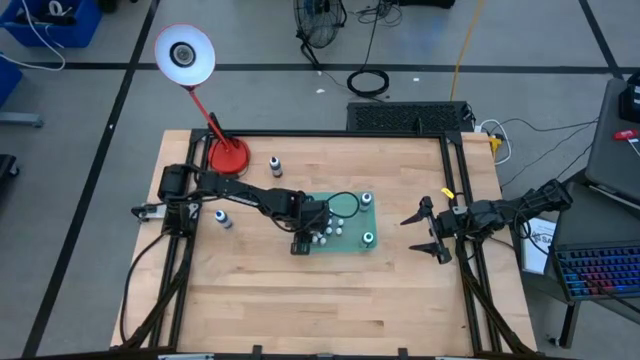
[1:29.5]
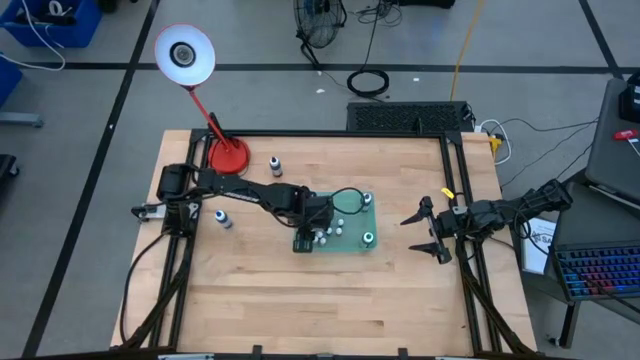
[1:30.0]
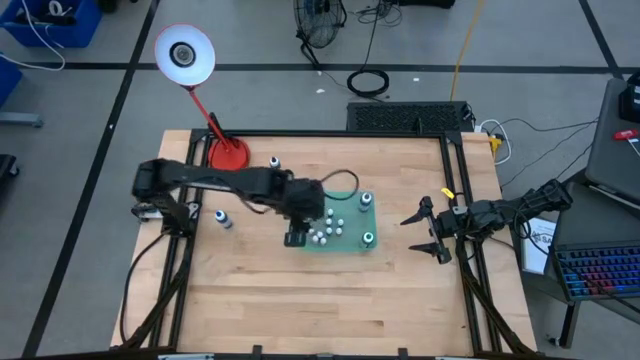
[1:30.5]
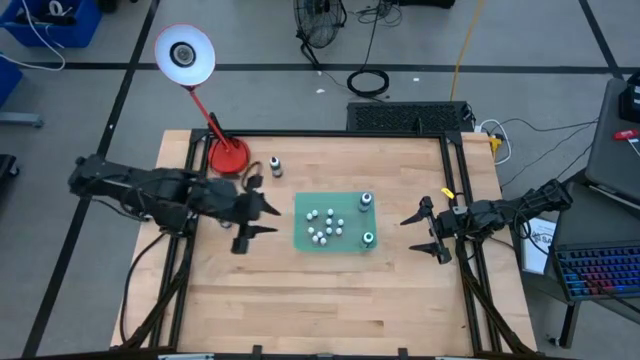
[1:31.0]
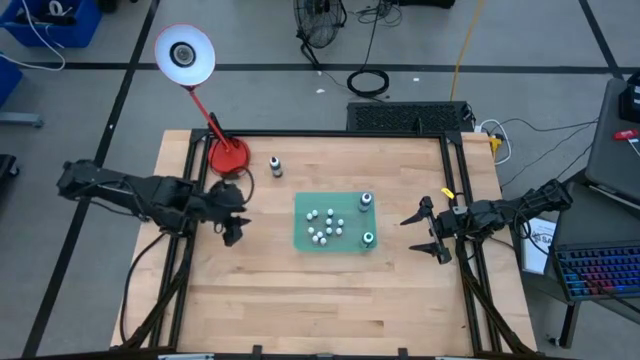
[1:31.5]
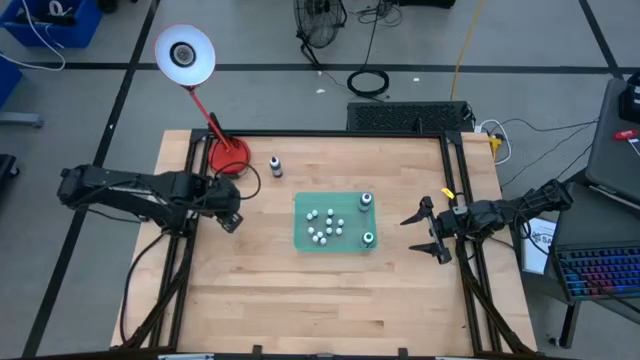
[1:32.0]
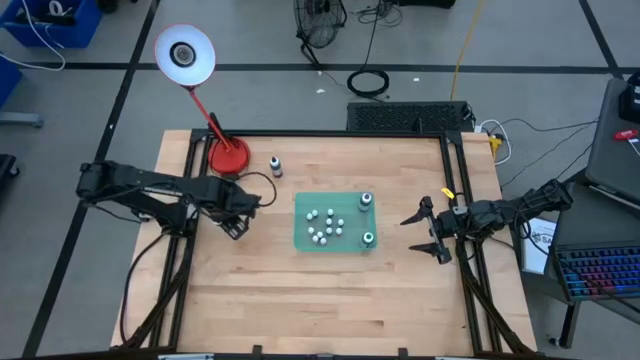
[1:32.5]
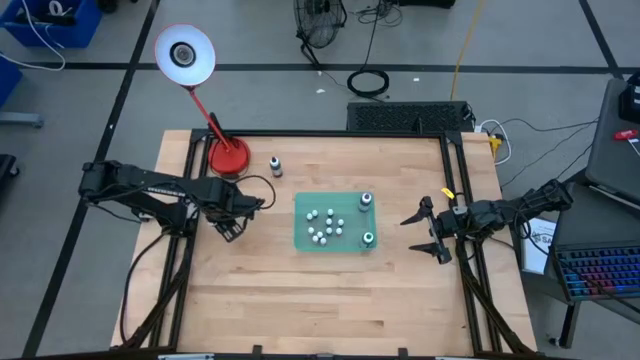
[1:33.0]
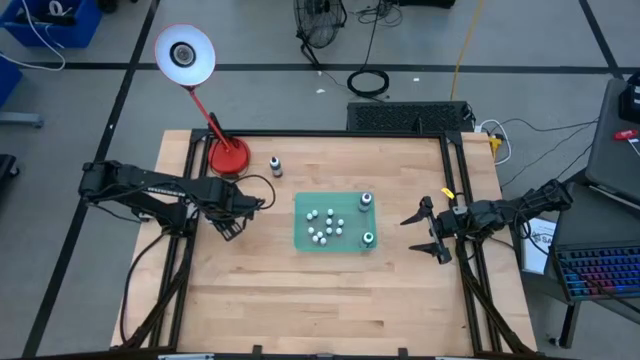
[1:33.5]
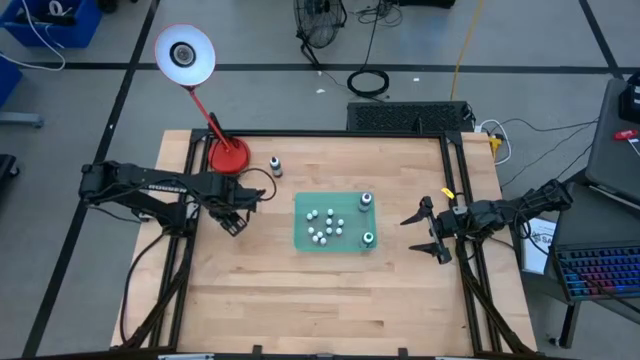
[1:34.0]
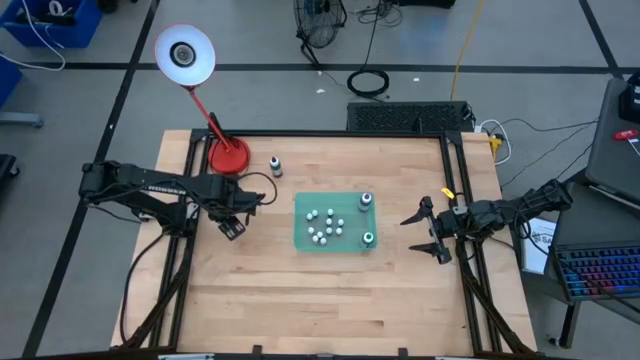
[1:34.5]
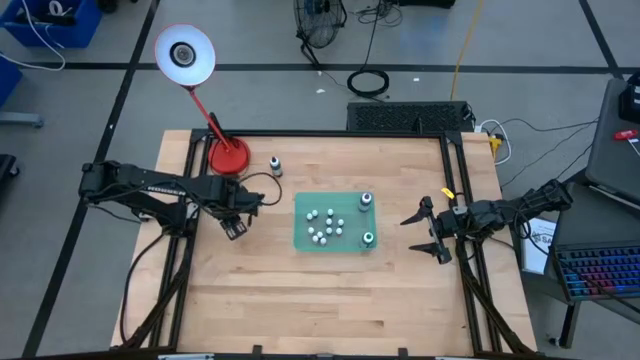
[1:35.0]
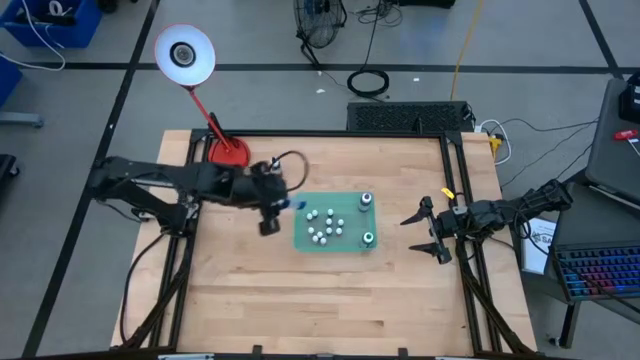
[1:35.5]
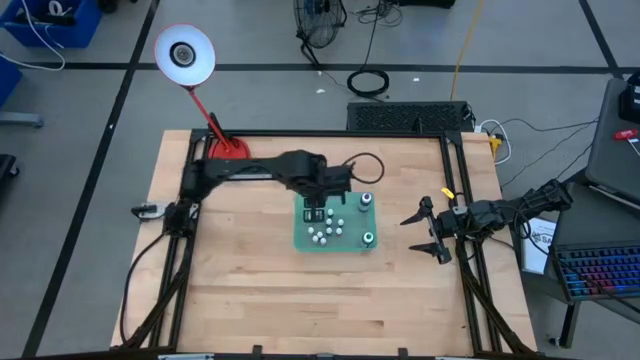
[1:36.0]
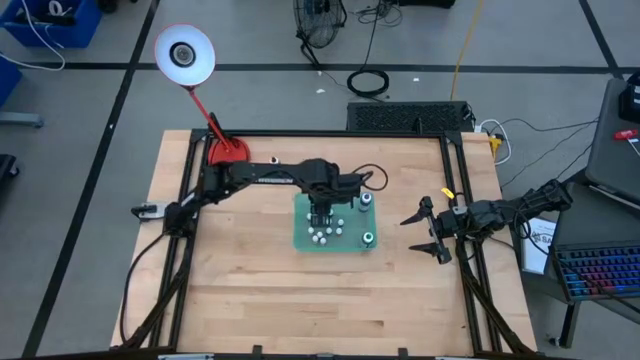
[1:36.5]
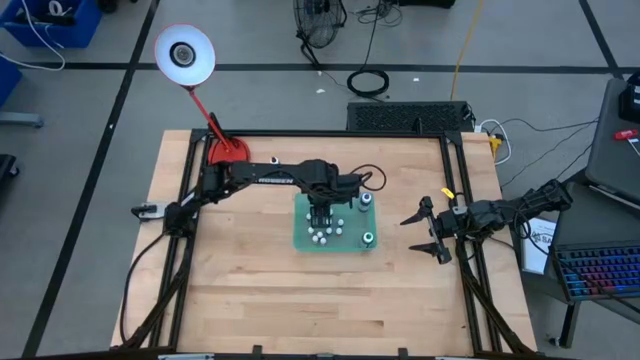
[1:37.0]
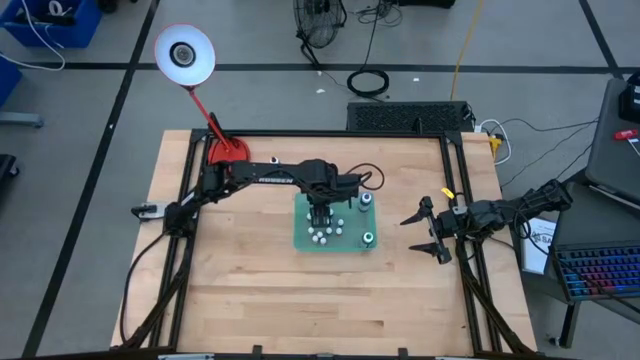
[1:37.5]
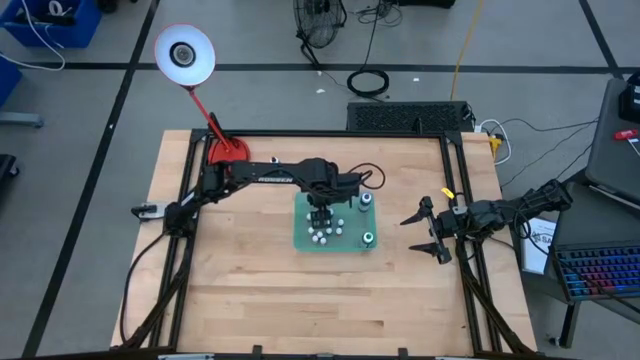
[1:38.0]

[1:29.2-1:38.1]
Task: Pick & Place food coloring
Put the big blue food coloring bottle into the bin

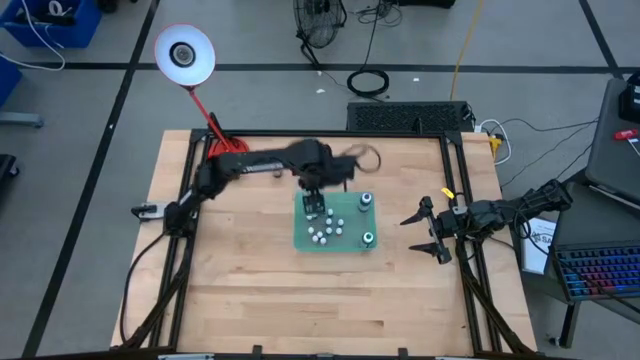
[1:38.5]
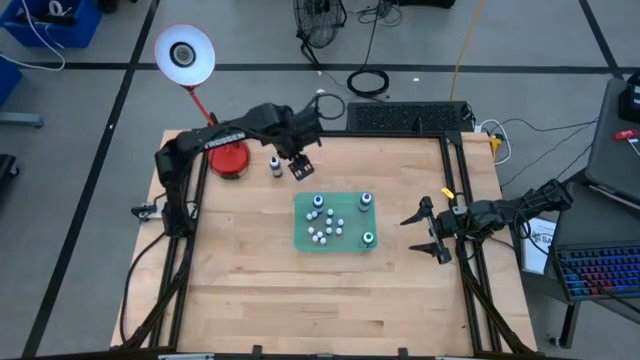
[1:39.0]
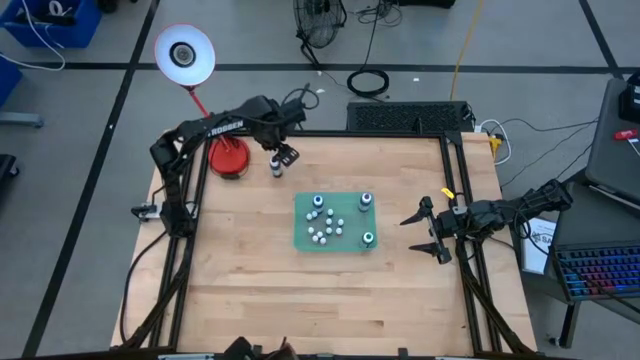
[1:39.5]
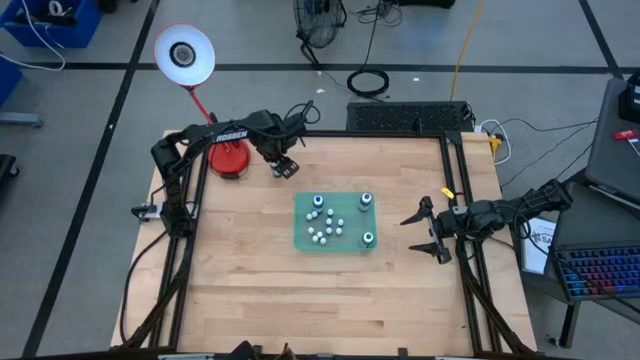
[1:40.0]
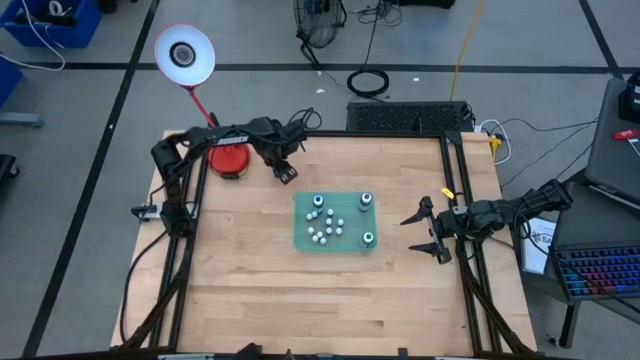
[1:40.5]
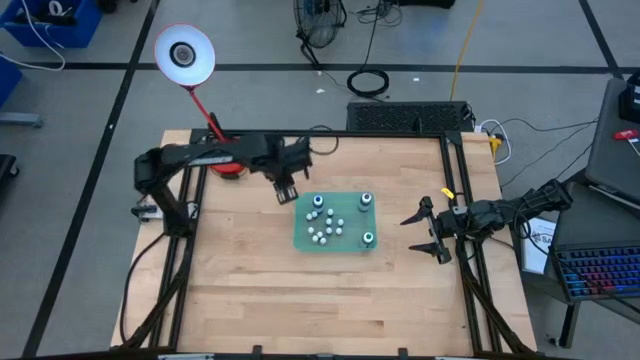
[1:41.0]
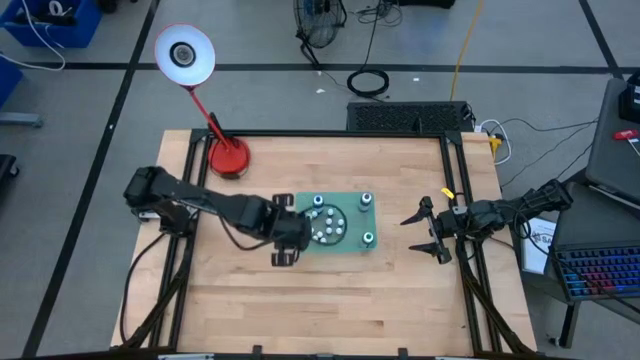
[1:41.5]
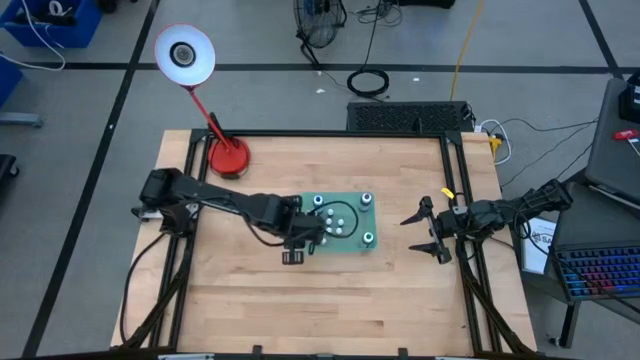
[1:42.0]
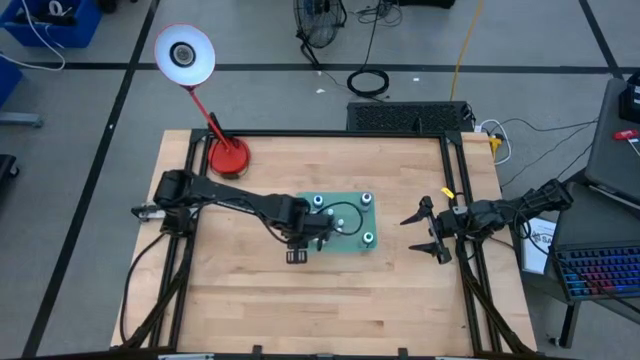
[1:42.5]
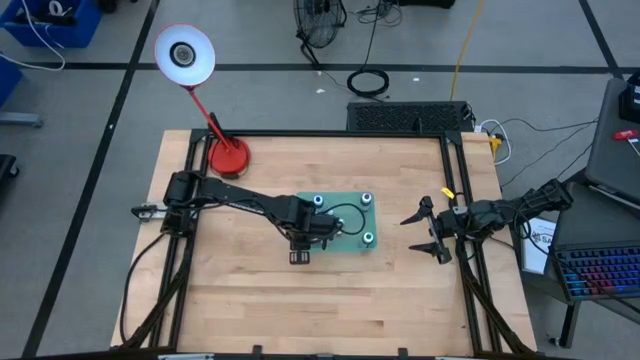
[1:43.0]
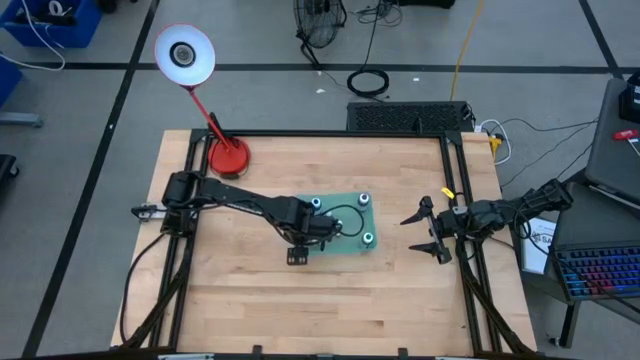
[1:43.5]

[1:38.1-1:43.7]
Put the big black food coloring bottle into the bin

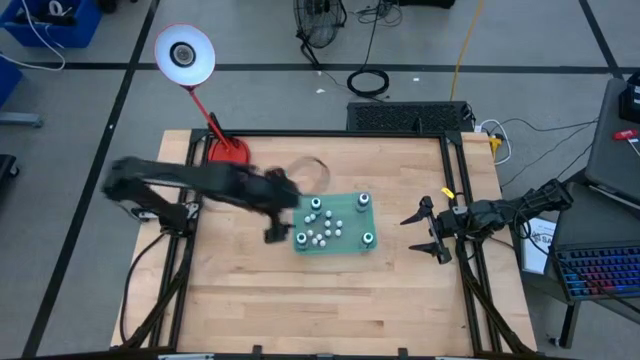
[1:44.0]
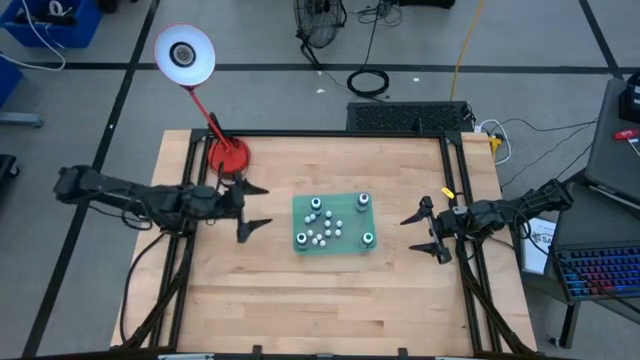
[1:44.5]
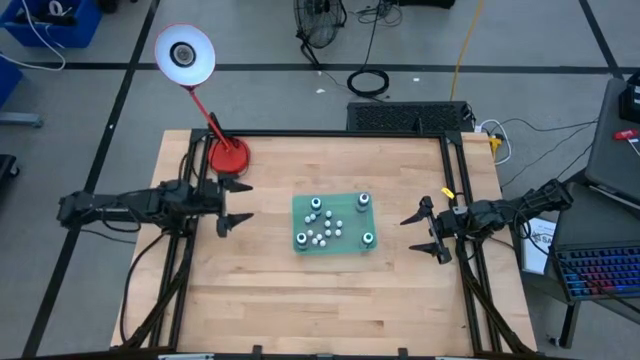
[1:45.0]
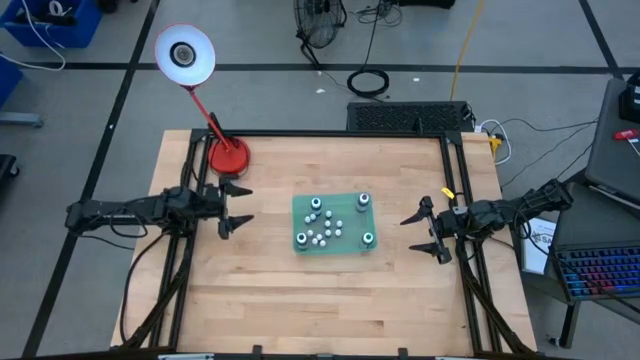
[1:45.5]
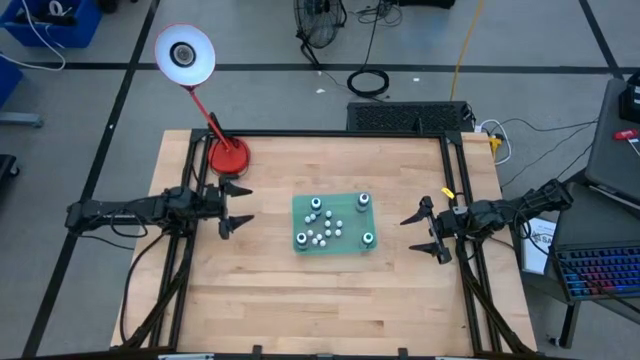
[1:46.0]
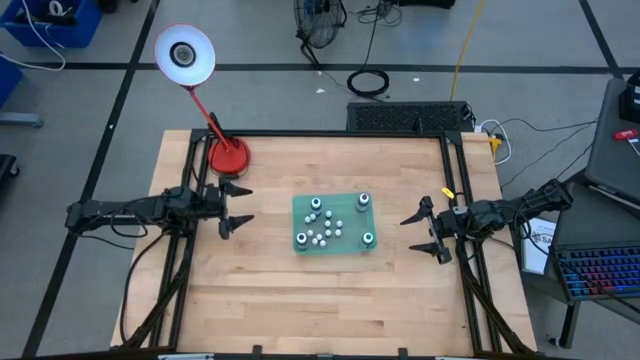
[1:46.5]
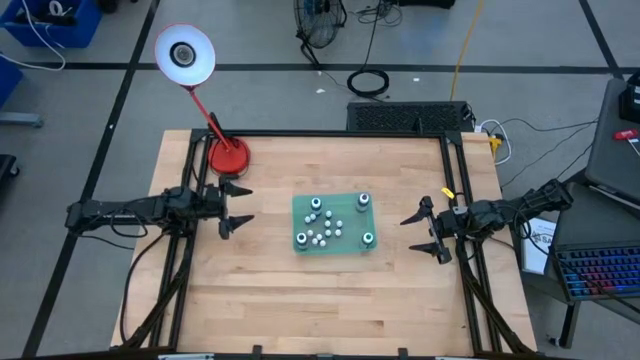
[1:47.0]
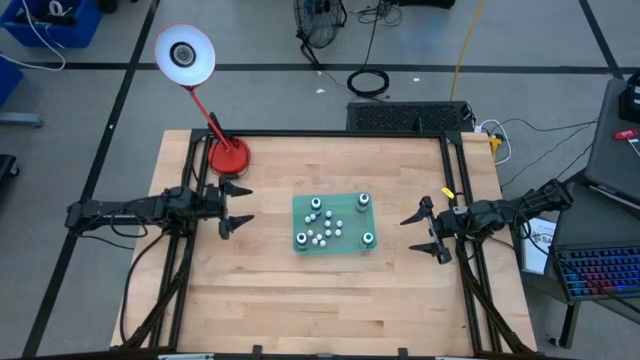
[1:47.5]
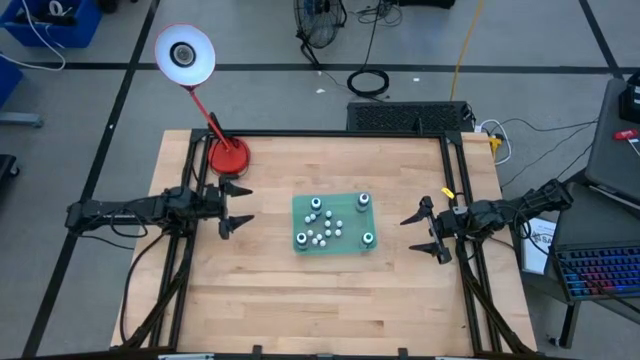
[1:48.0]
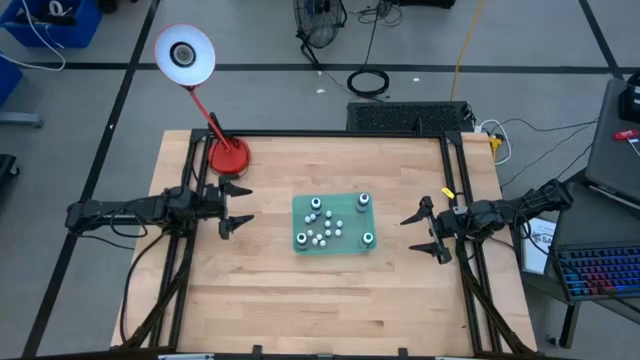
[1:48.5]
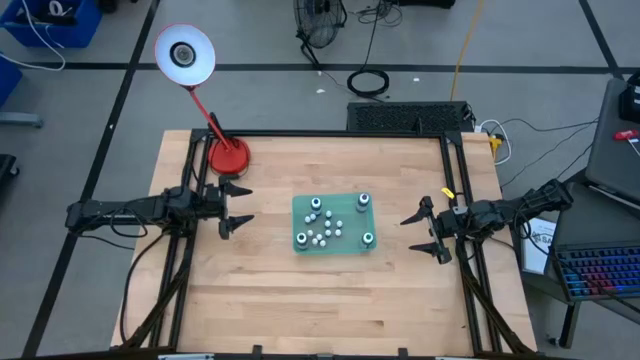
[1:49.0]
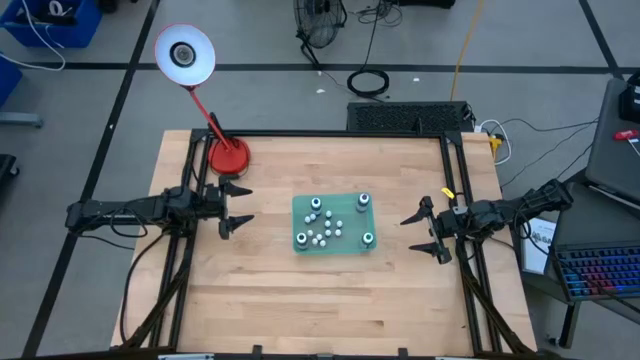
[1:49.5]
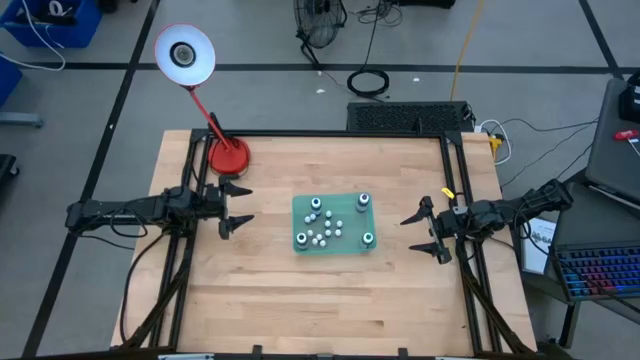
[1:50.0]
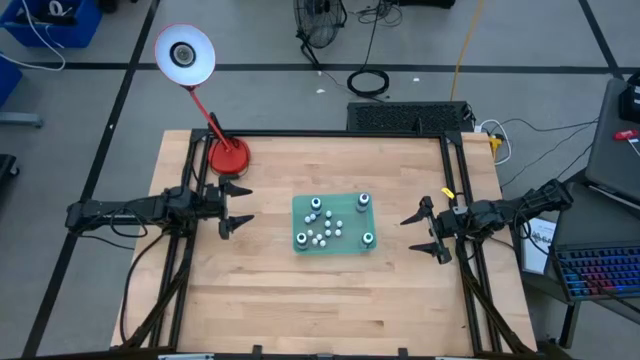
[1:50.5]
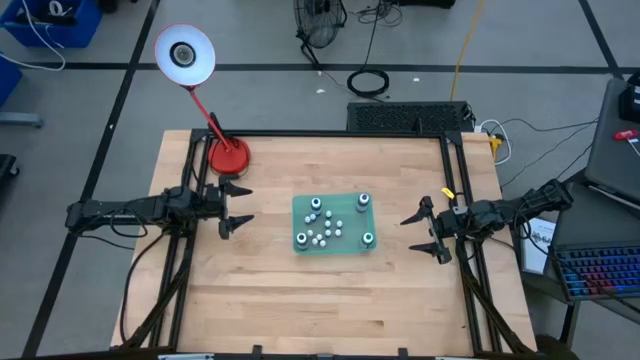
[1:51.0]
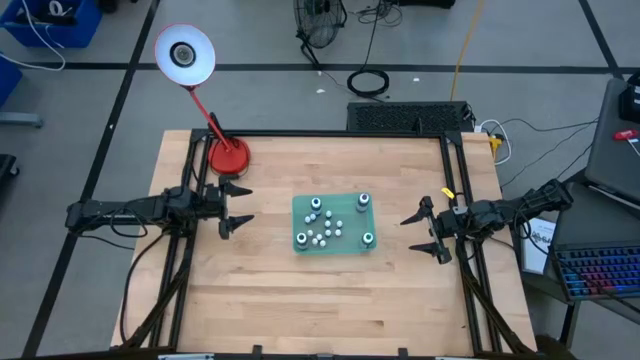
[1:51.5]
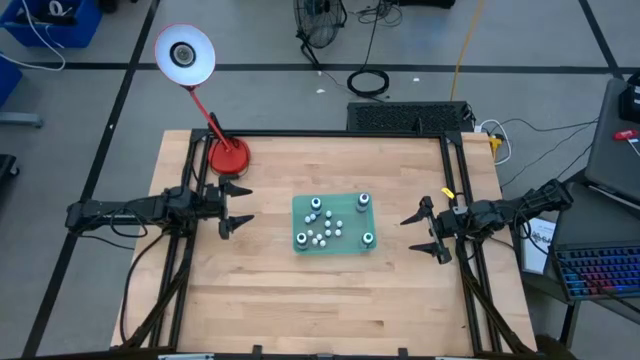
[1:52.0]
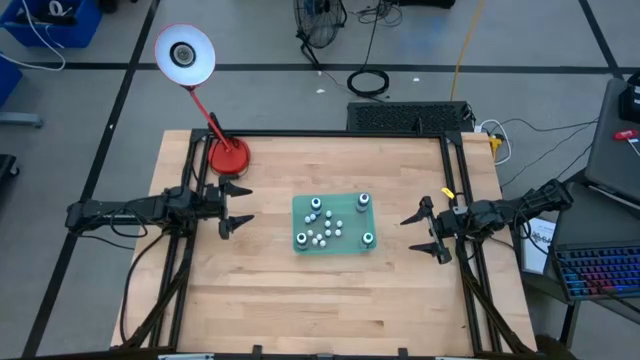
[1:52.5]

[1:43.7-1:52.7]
Return to Home Position
